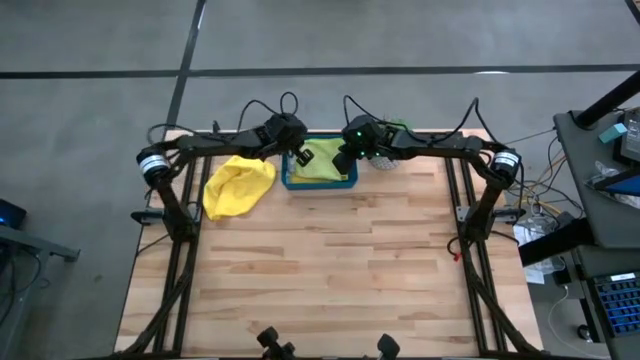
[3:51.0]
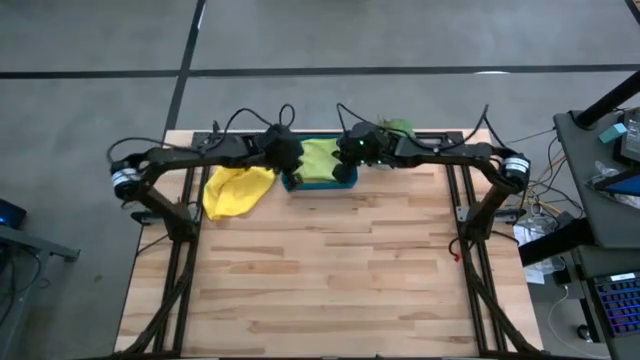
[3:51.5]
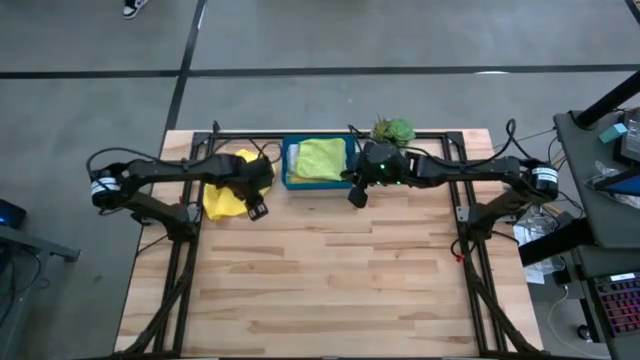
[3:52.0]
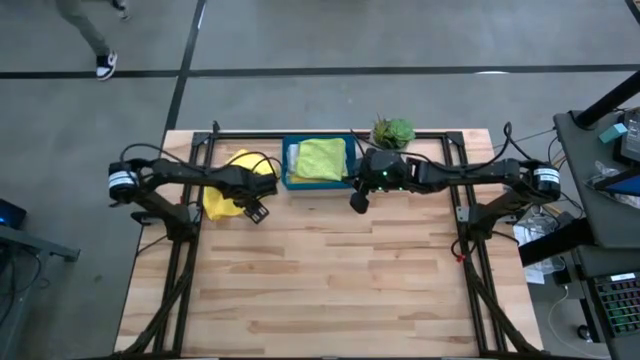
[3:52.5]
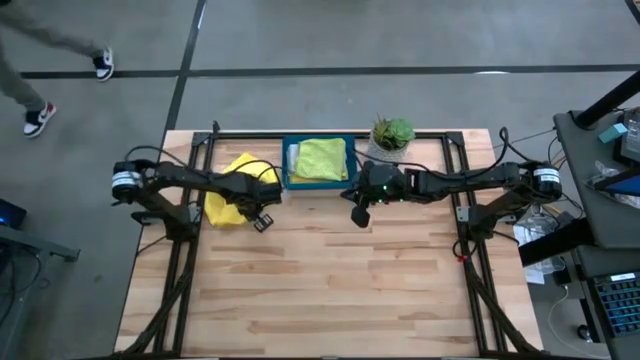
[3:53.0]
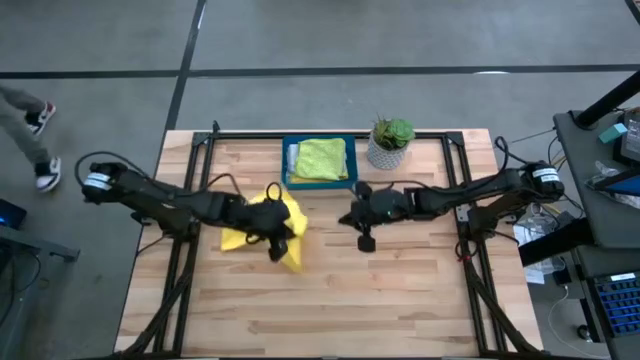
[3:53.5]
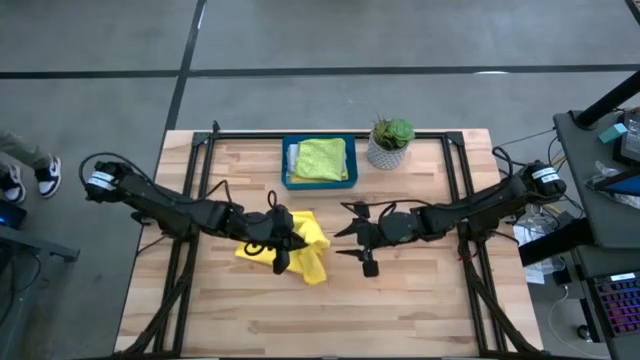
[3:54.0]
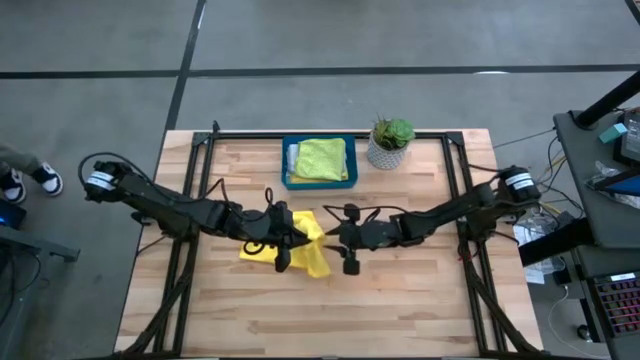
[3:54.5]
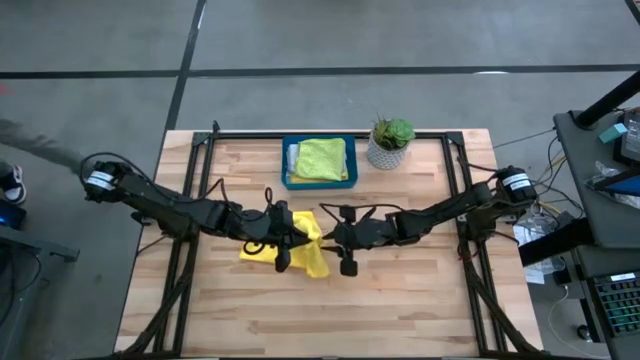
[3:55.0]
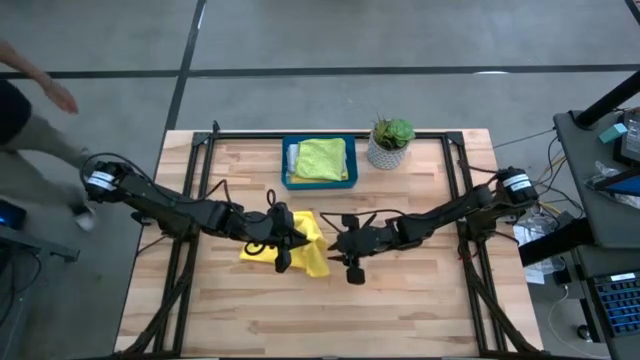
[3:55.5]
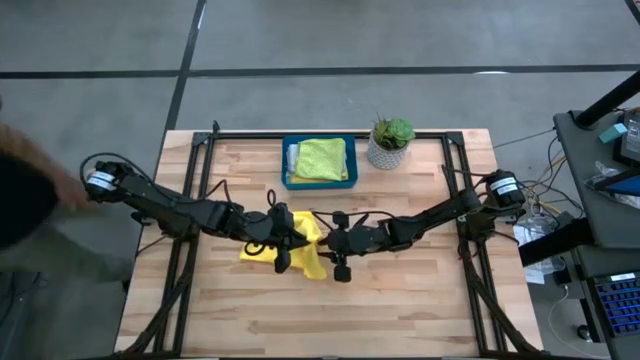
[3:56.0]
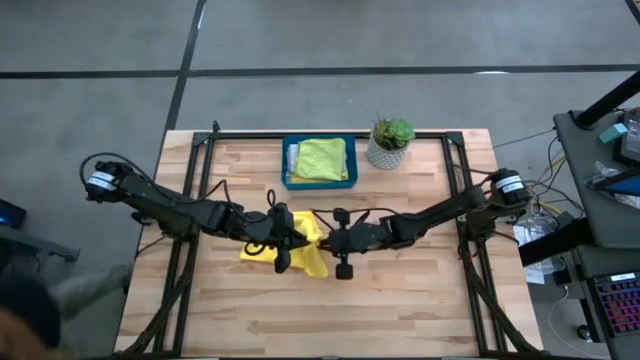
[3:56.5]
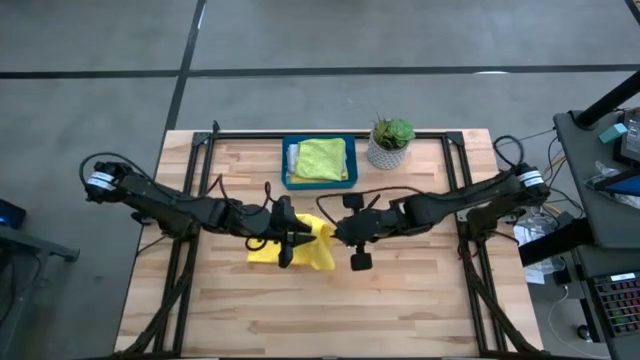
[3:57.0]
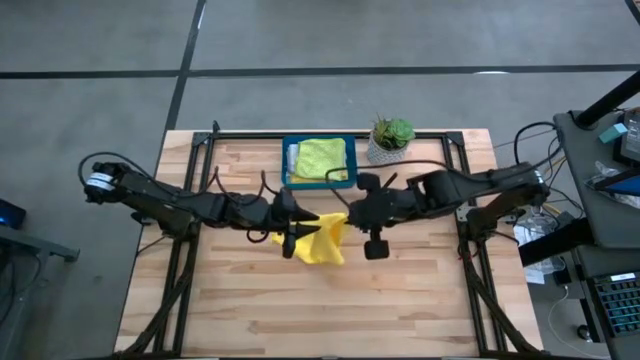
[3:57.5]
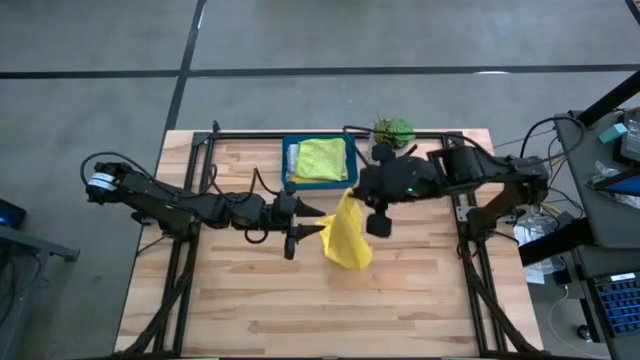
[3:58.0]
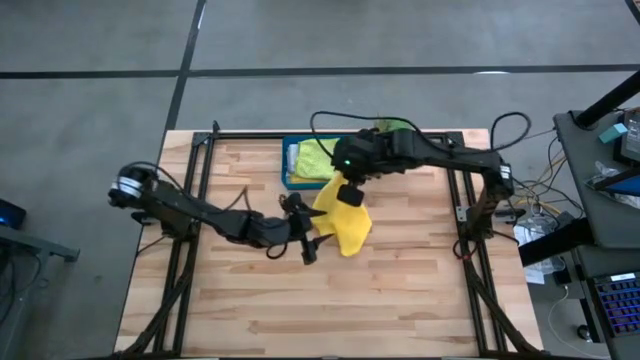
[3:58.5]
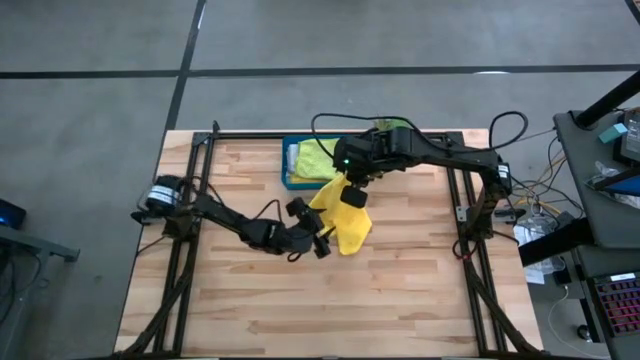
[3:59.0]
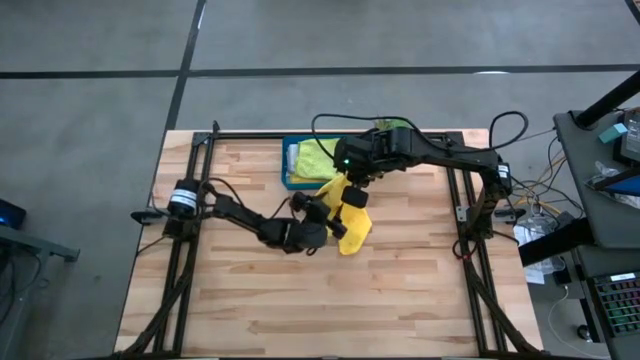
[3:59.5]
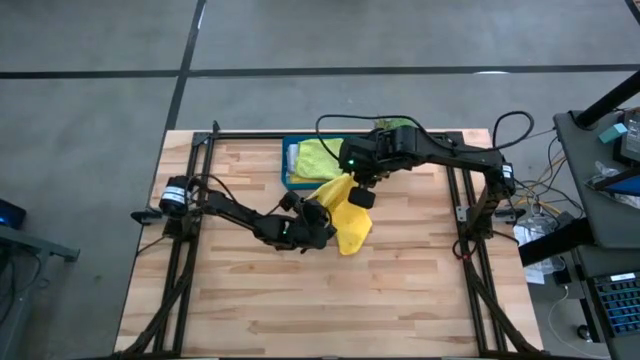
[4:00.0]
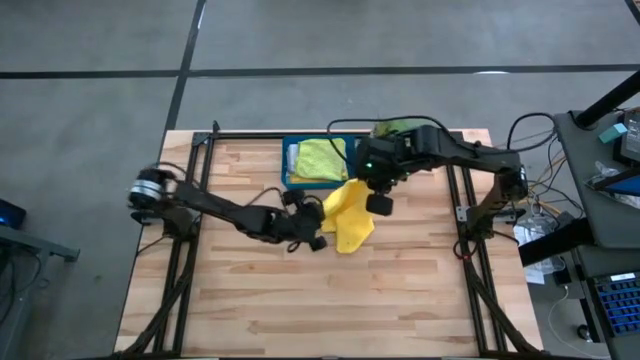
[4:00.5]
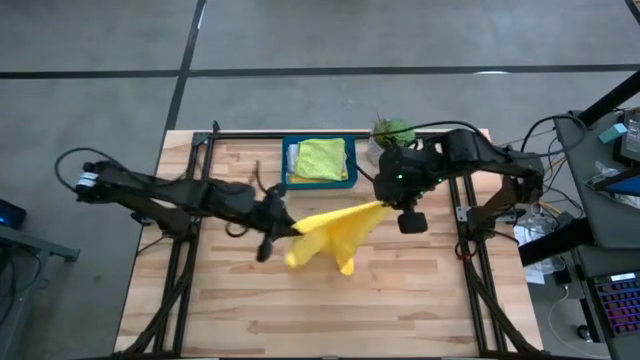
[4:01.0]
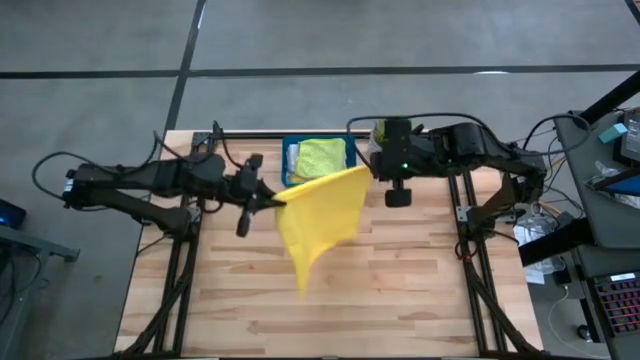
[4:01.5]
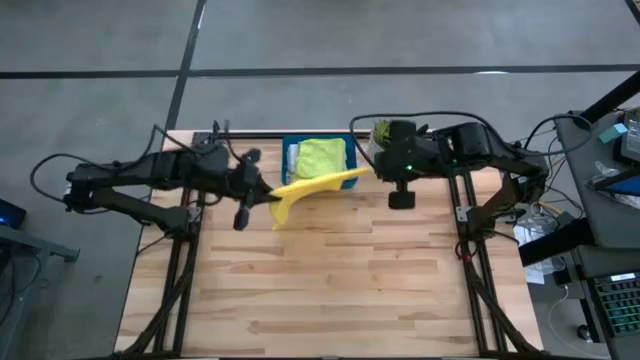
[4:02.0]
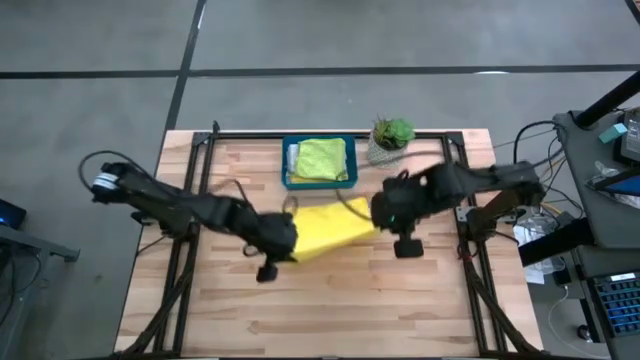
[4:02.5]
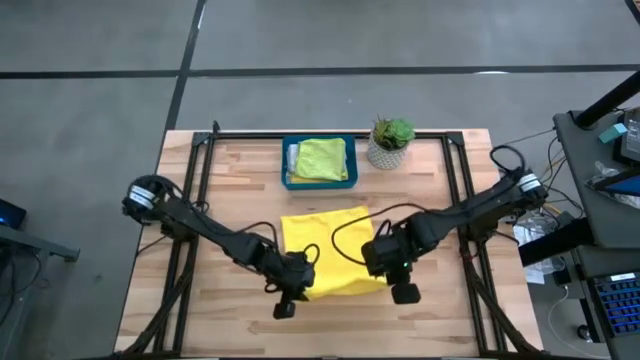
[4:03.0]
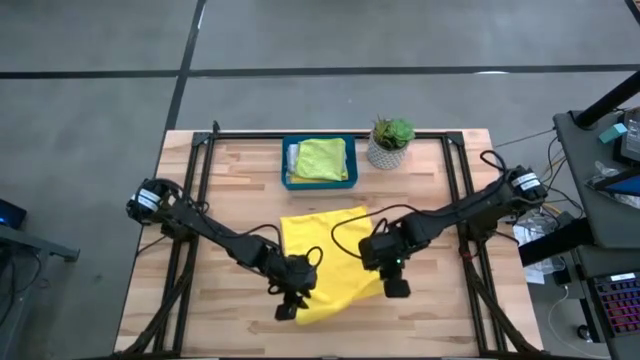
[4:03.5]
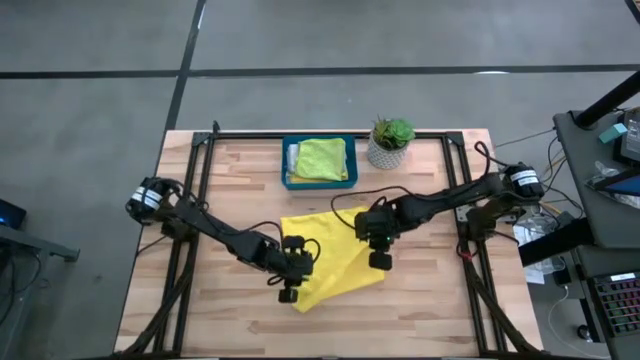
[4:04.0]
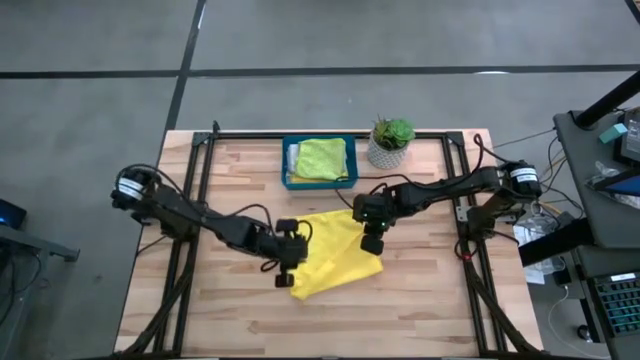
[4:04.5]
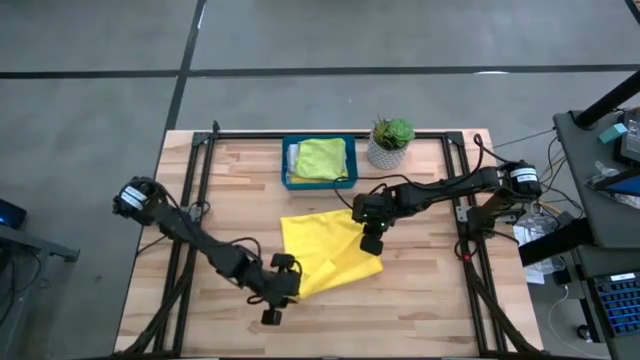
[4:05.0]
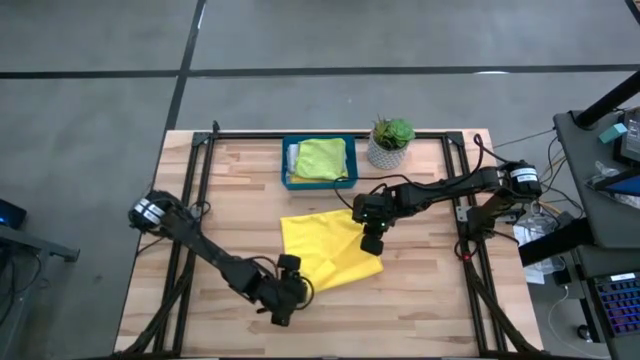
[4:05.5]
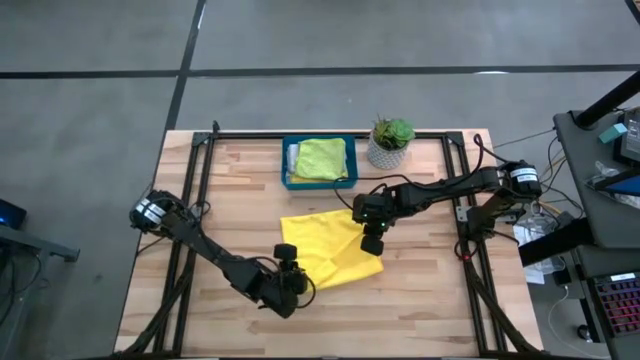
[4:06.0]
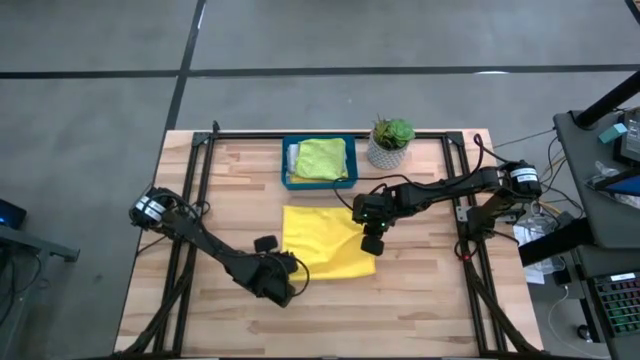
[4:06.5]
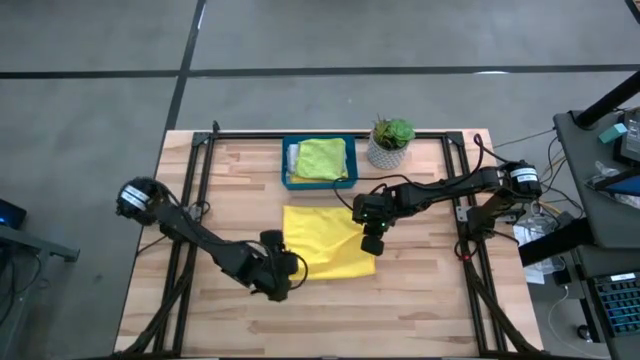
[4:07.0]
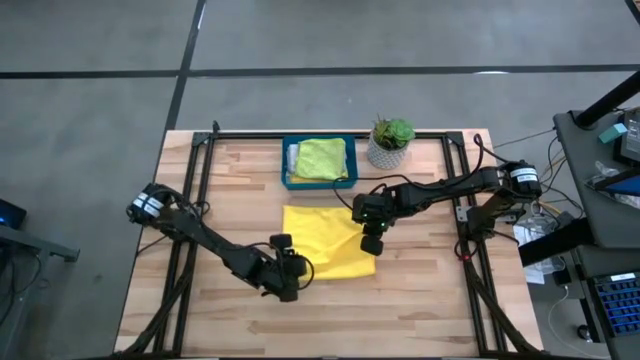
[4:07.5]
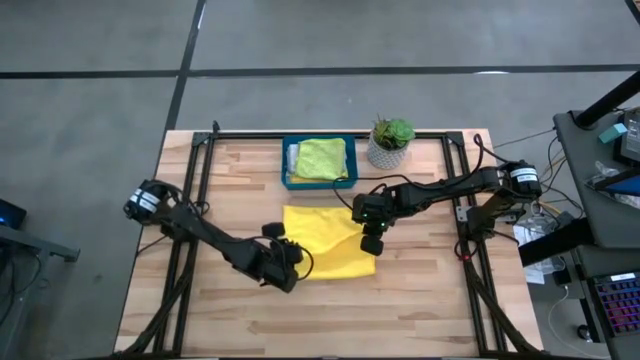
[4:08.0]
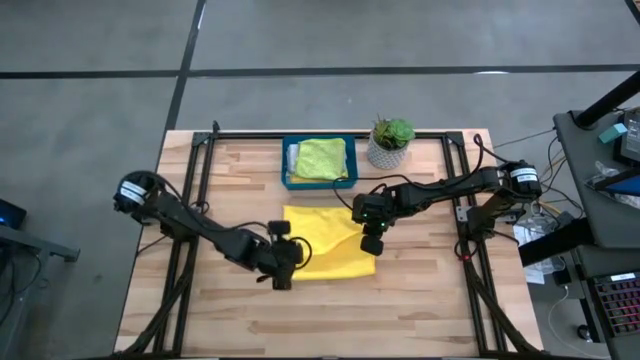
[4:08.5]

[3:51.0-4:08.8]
Task: Fold microfiber towels
Fold the yellow microfiber cloth

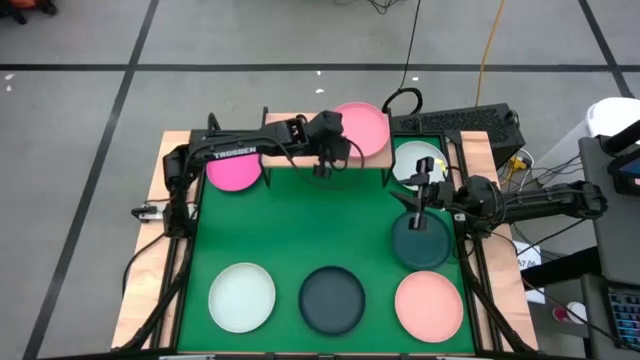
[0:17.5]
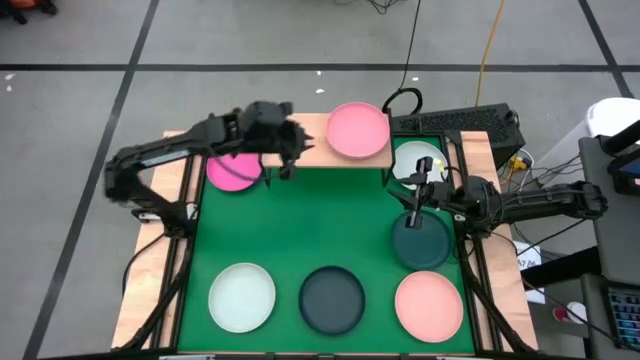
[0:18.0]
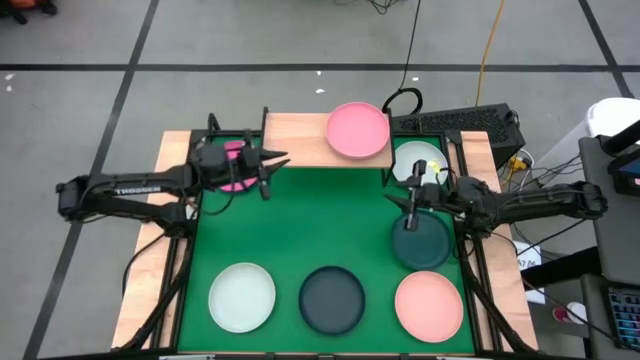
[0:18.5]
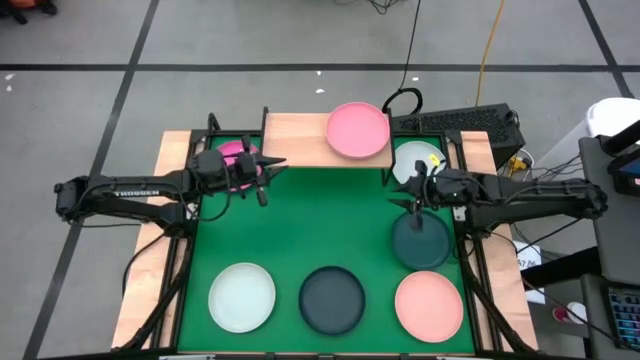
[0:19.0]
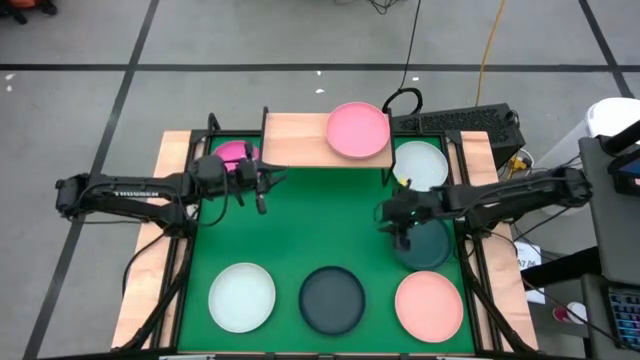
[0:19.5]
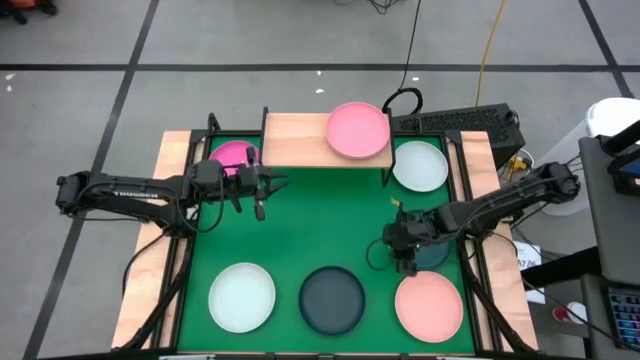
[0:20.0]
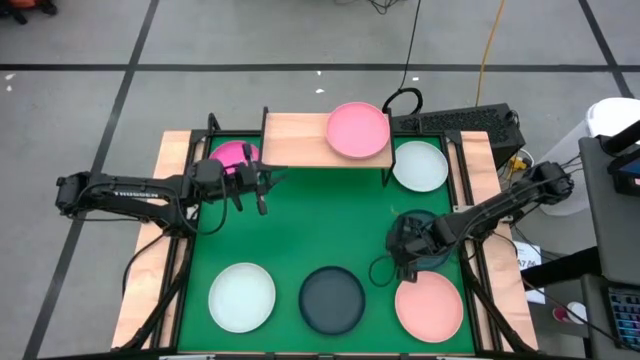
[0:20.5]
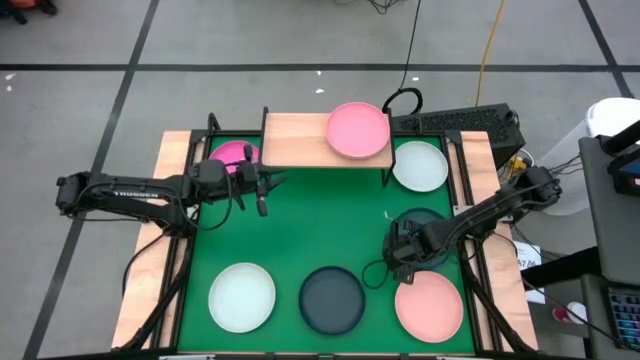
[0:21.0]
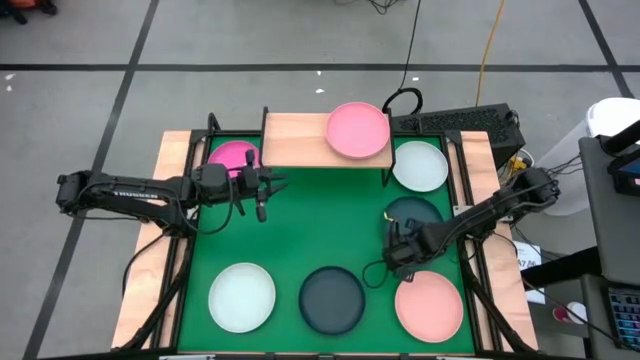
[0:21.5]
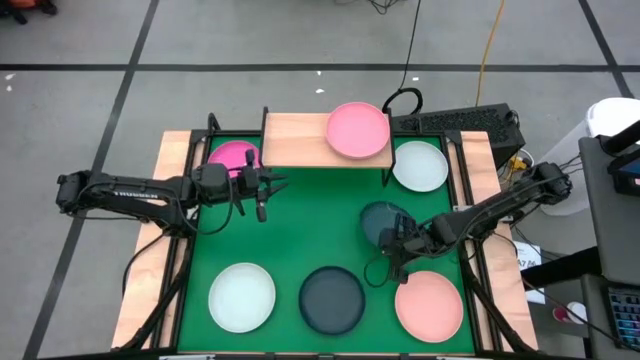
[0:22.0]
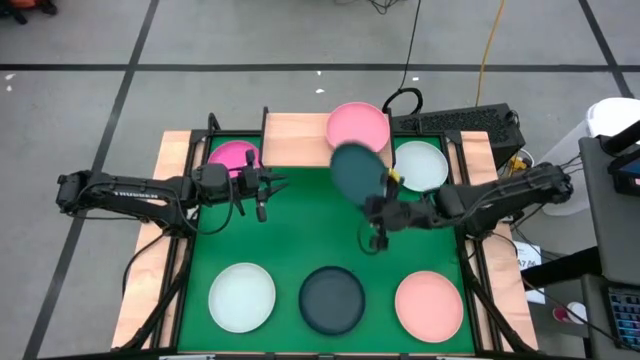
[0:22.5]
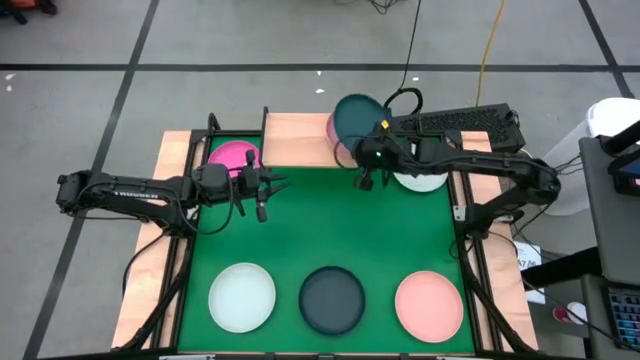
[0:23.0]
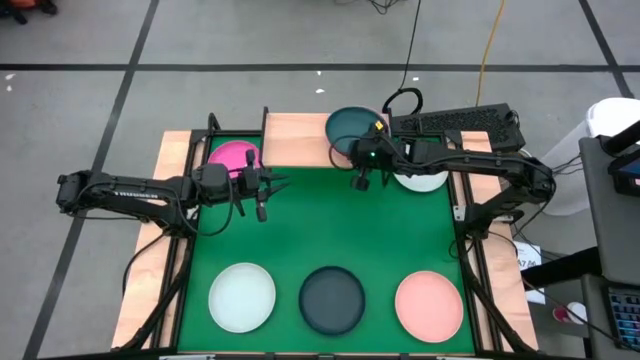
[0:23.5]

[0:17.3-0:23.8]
Task: Place and stack plates onto a shelf
Stack the dark green plate on the light pink plate on the shelf
